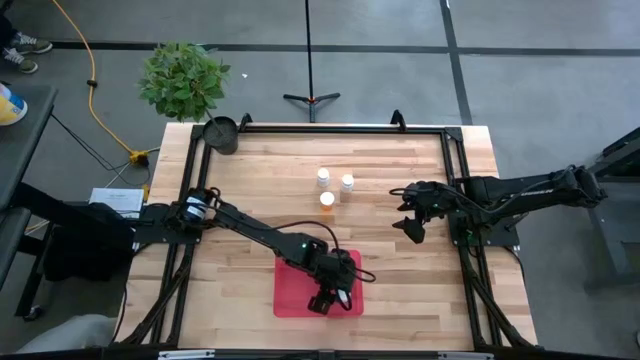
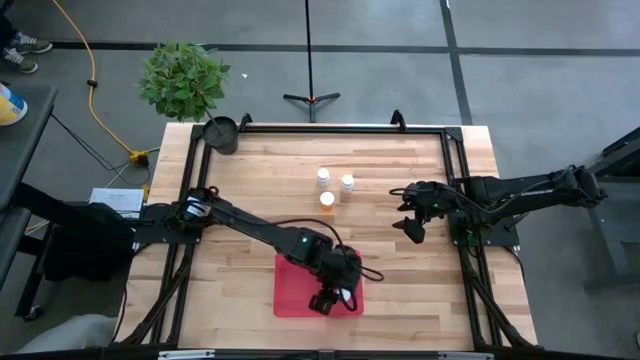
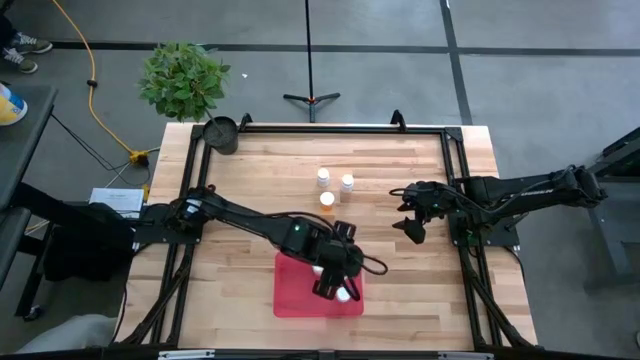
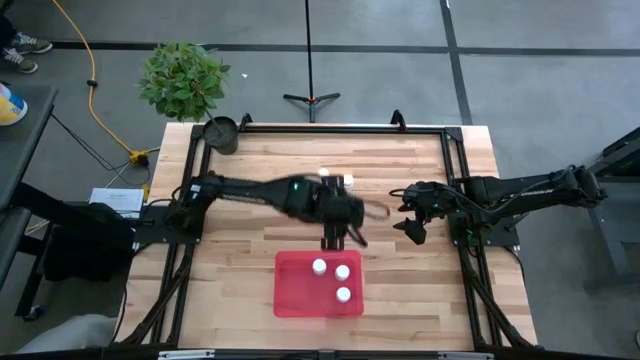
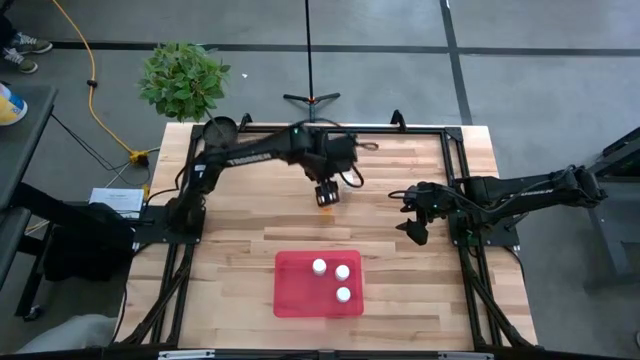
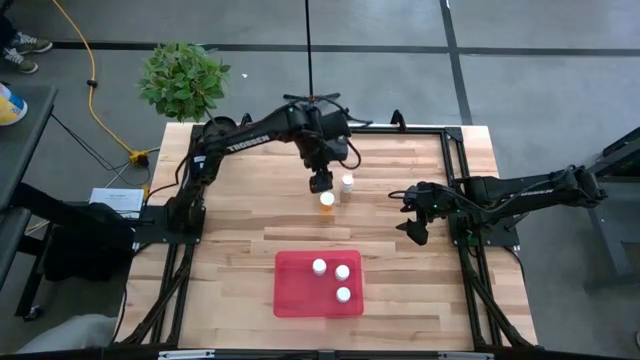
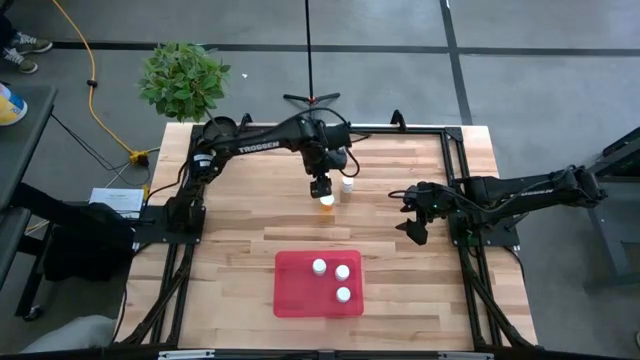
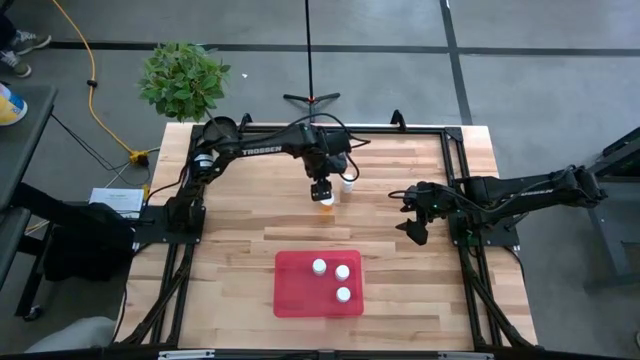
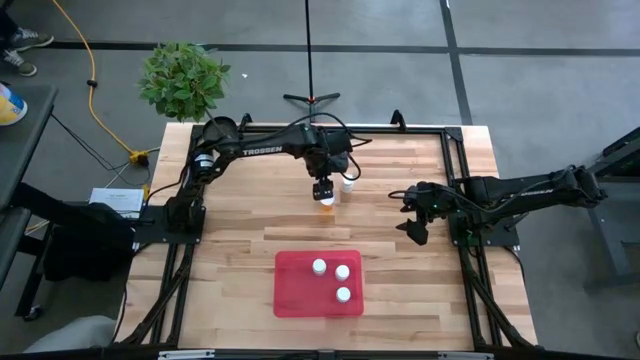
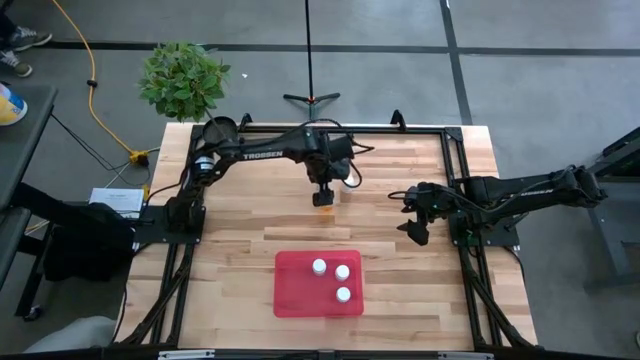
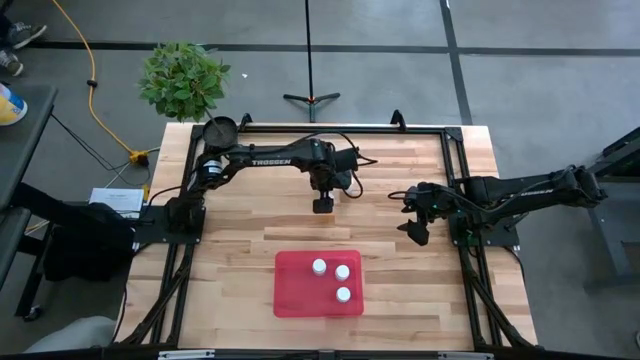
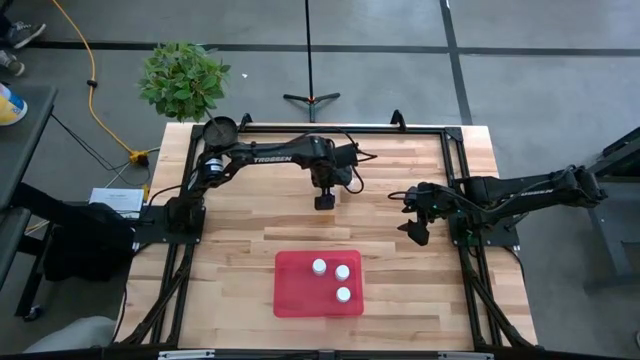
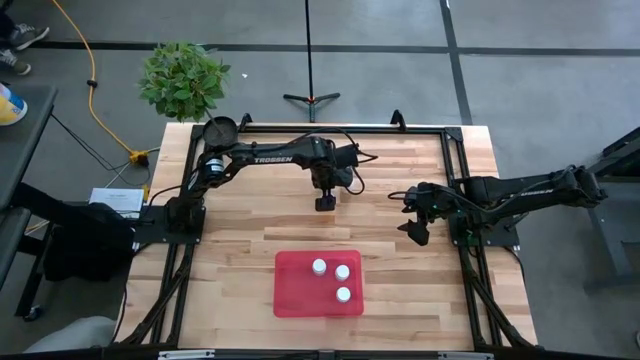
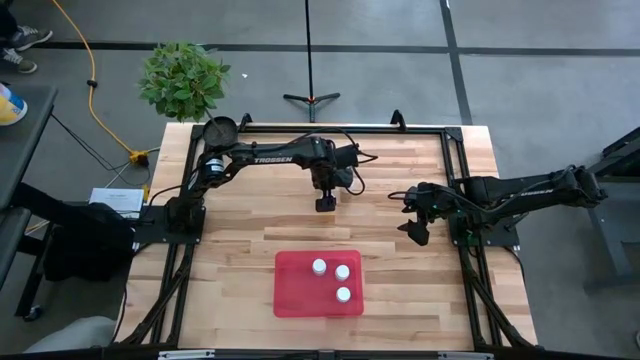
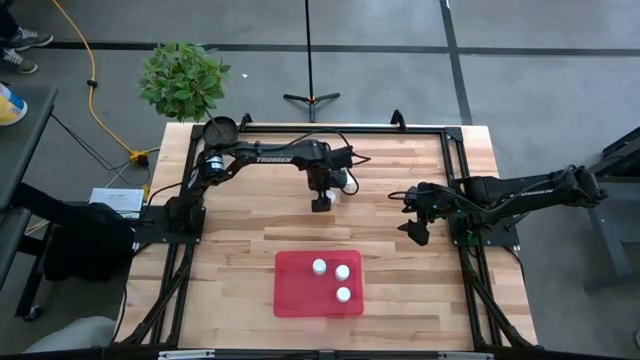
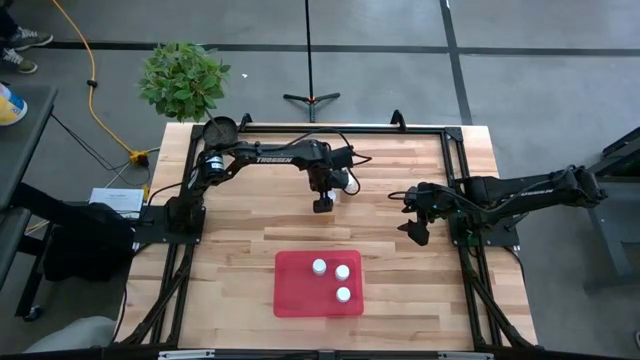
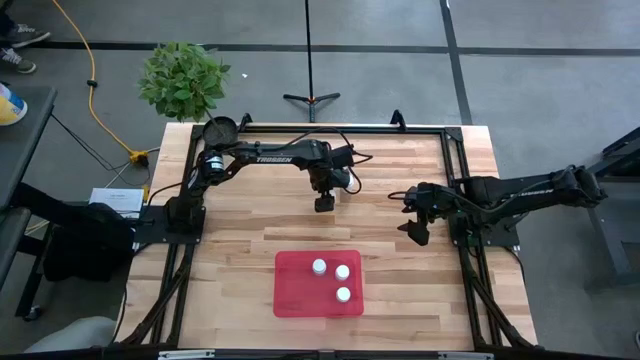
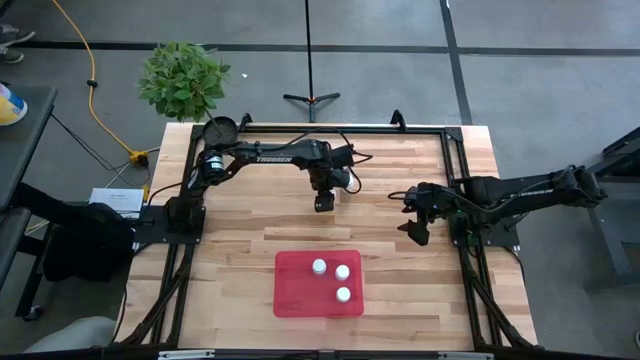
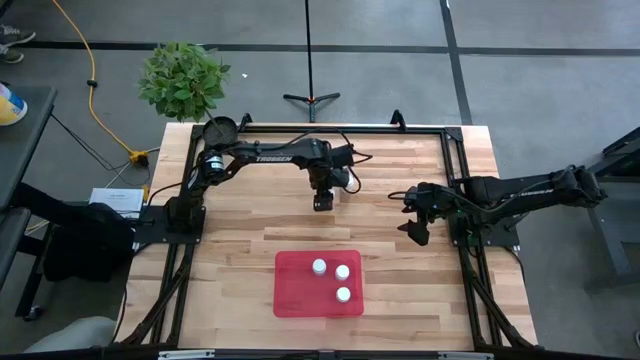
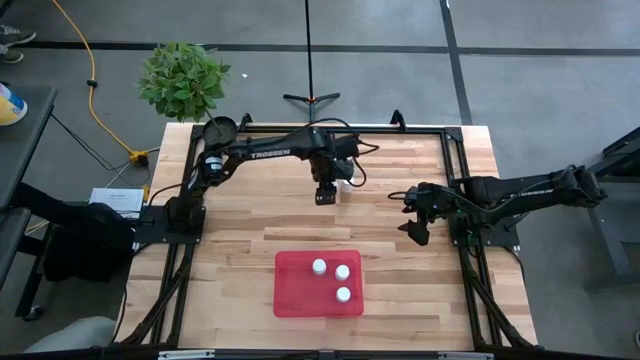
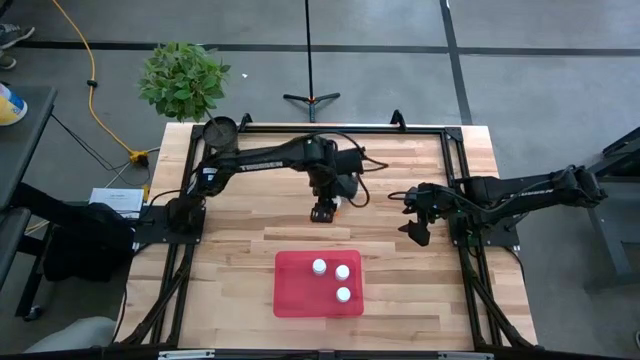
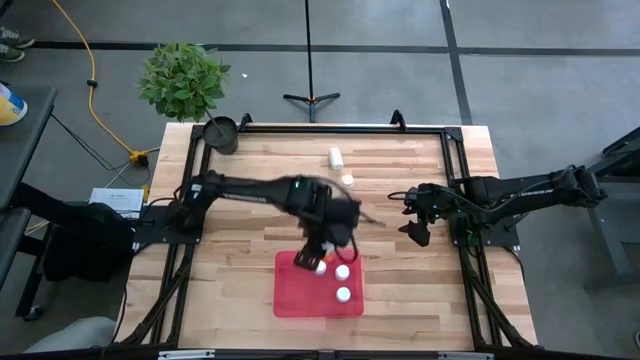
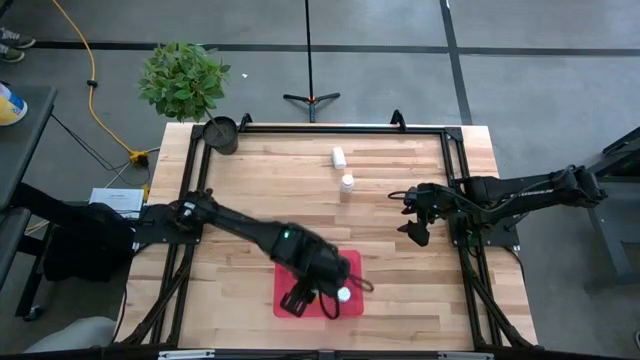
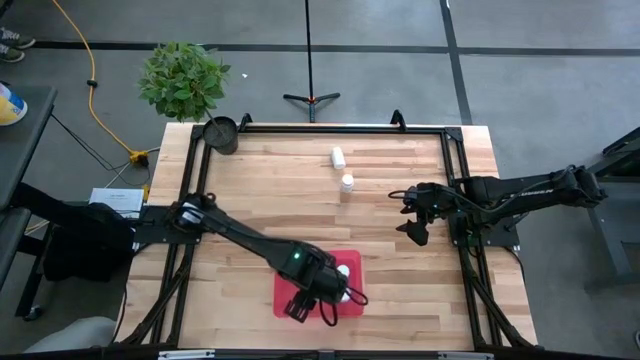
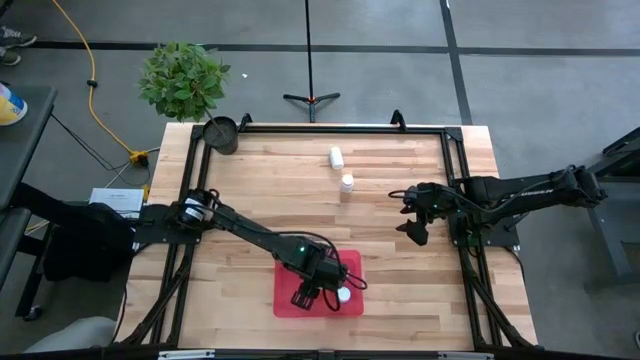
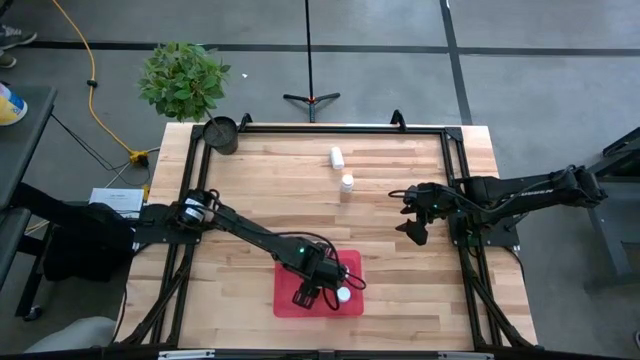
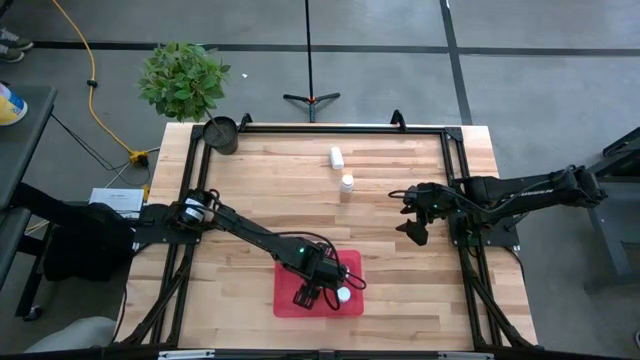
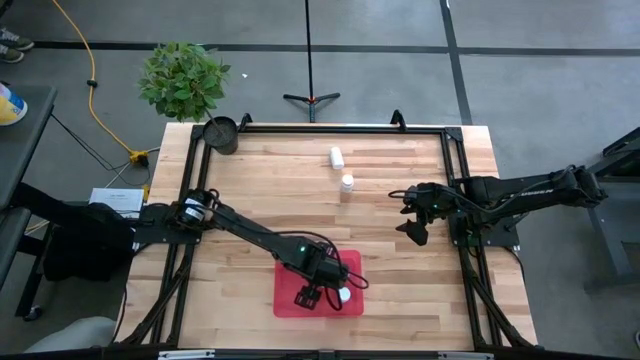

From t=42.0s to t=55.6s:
Task: Pick and place pill bottles into a basket
Put the orange medicine bottle into the red bin

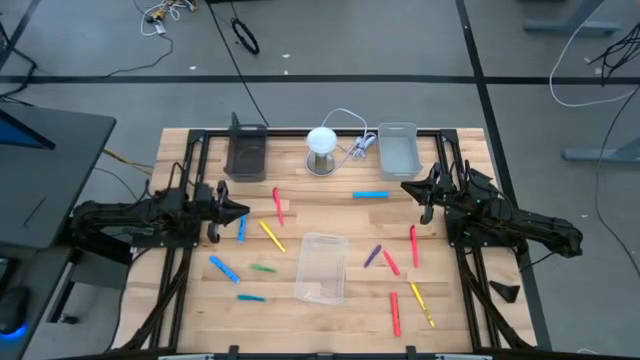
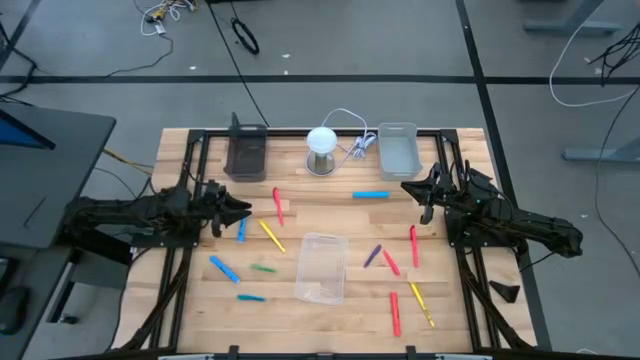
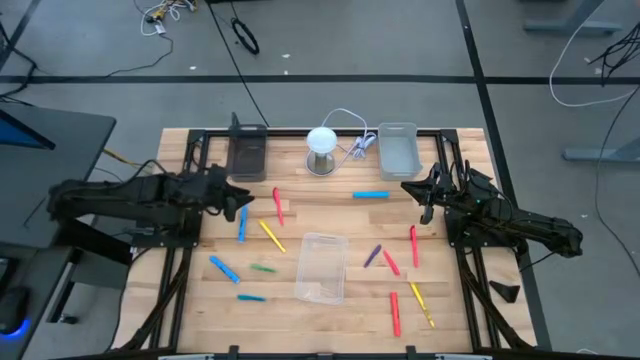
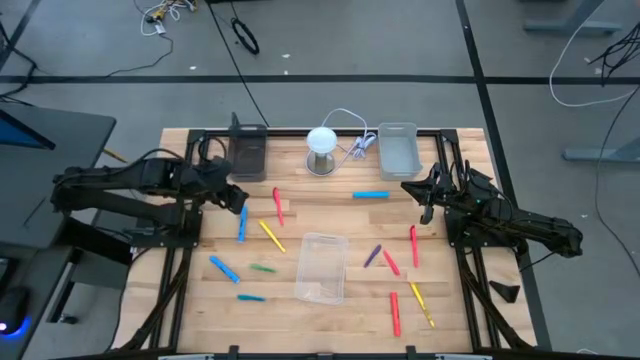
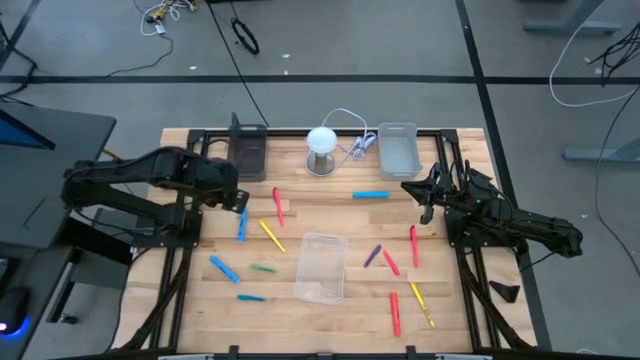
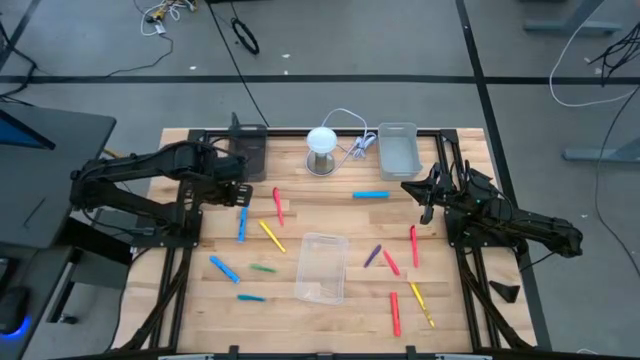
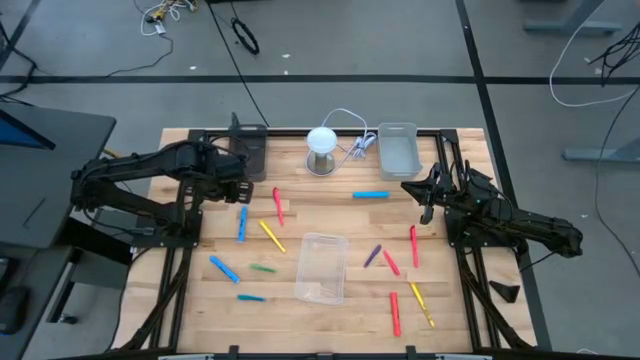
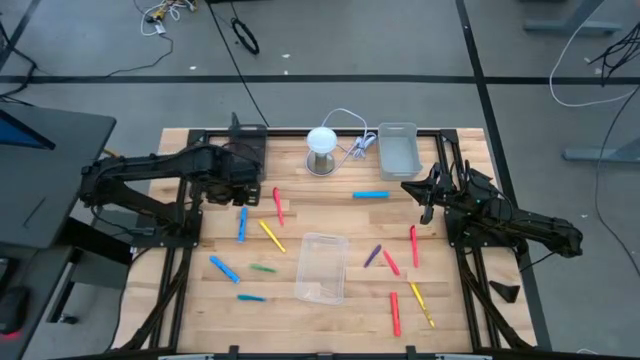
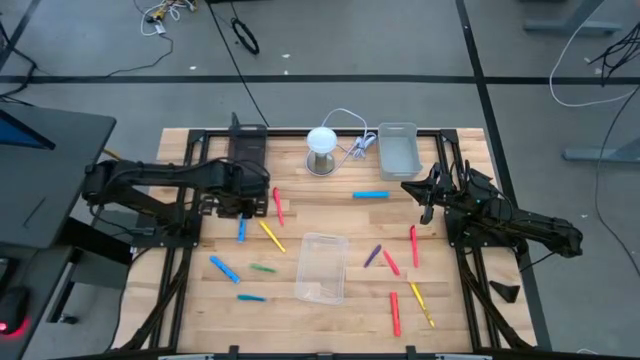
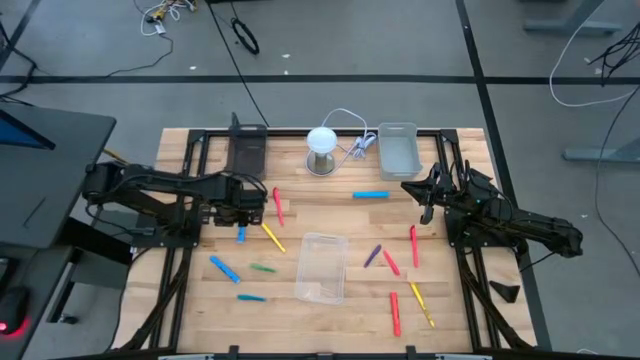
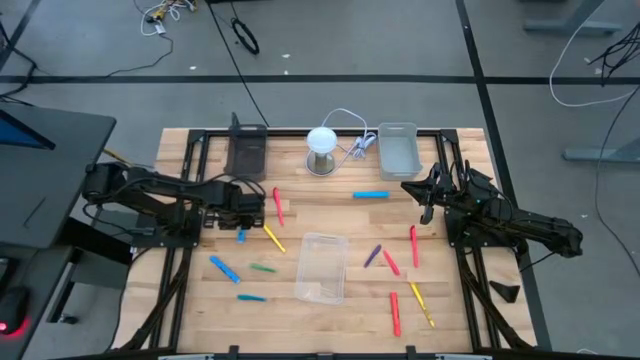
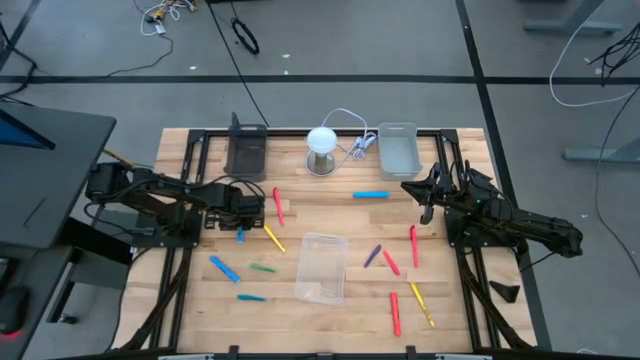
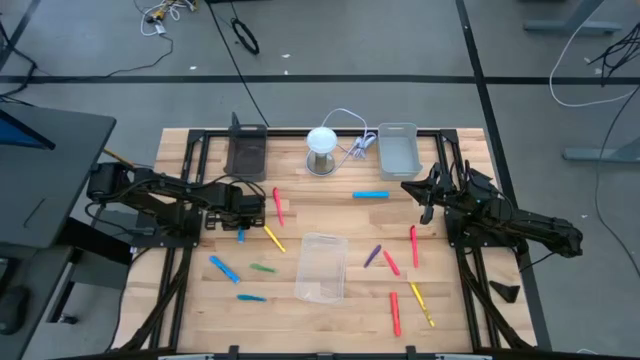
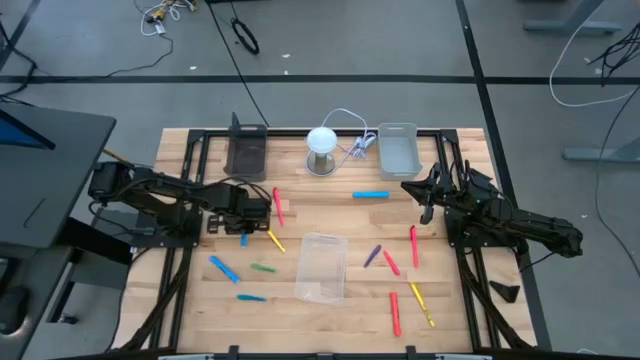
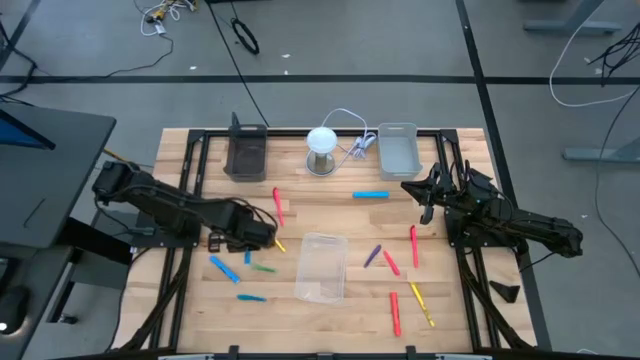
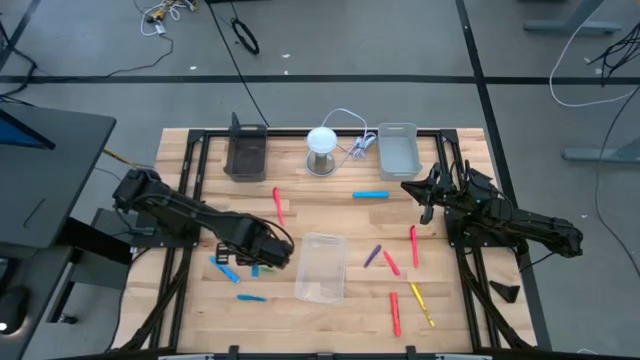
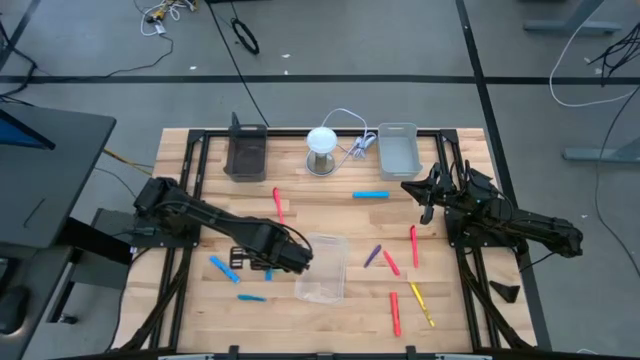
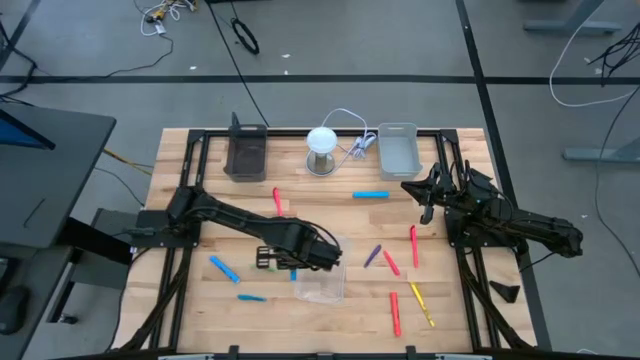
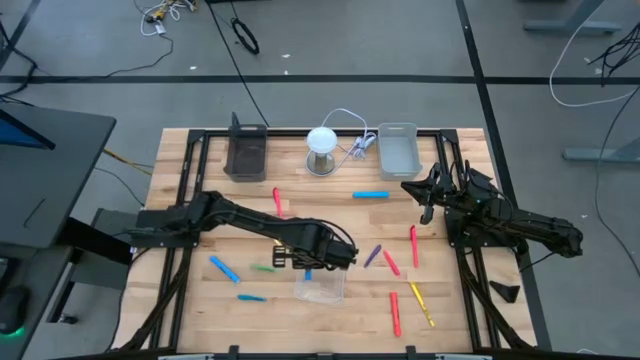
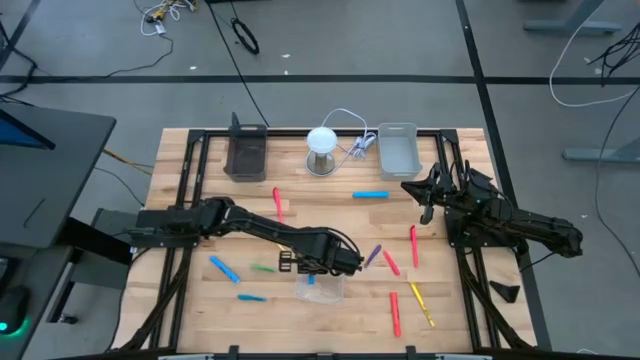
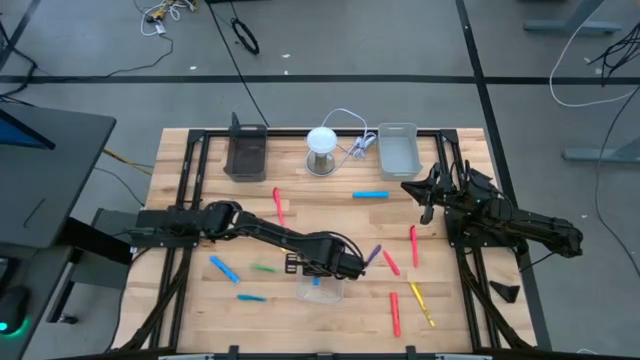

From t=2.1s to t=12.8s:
Task: Pick & Place Markers
Put the middle blue highlighter into the transparent bin
